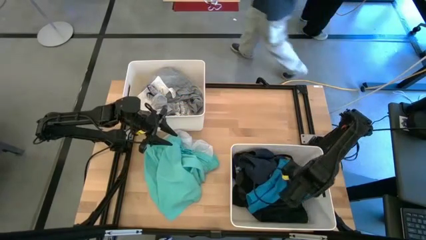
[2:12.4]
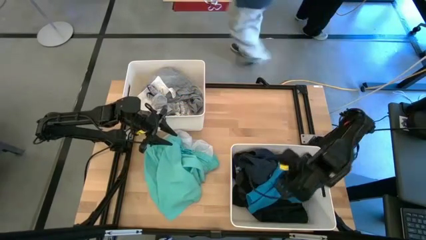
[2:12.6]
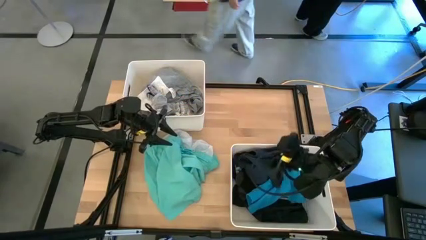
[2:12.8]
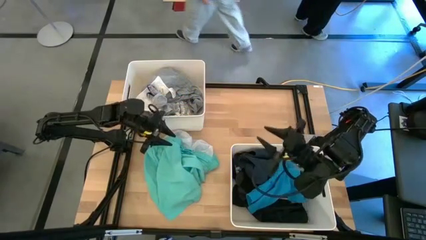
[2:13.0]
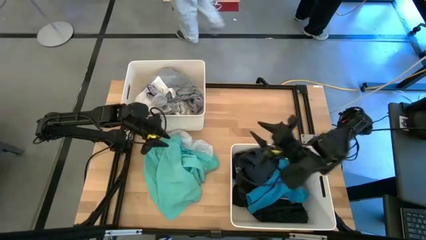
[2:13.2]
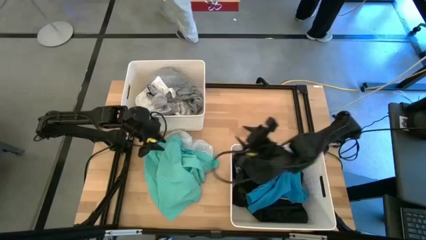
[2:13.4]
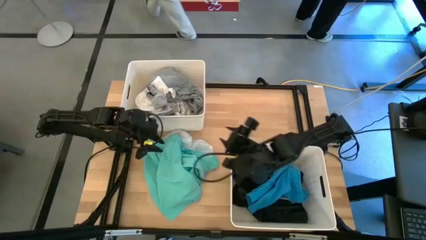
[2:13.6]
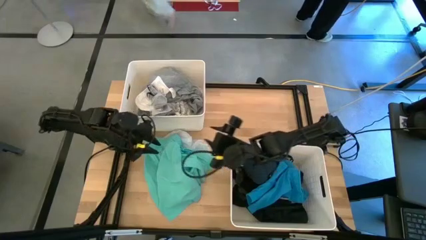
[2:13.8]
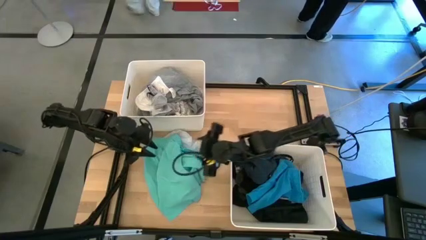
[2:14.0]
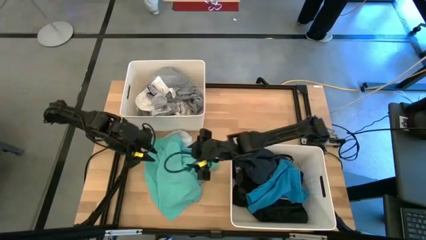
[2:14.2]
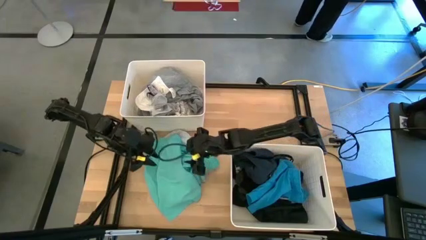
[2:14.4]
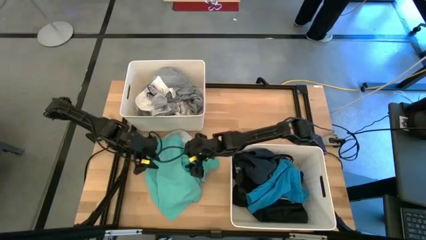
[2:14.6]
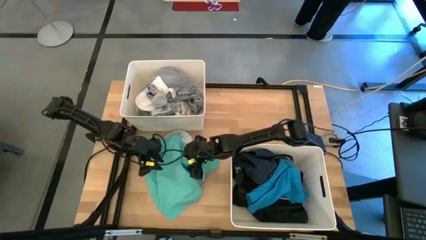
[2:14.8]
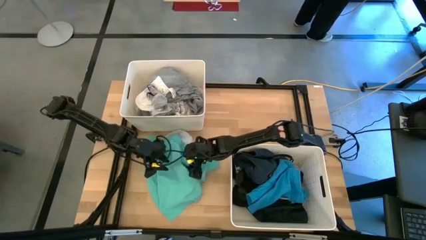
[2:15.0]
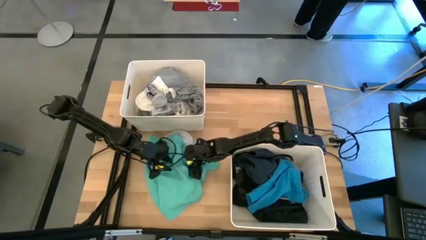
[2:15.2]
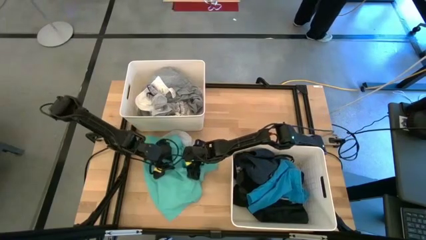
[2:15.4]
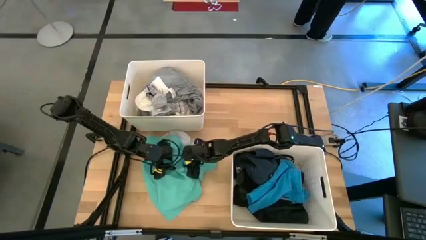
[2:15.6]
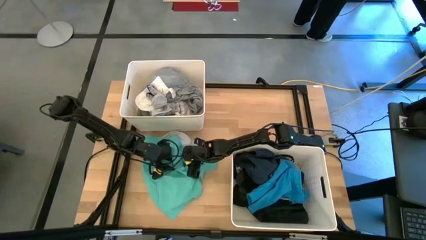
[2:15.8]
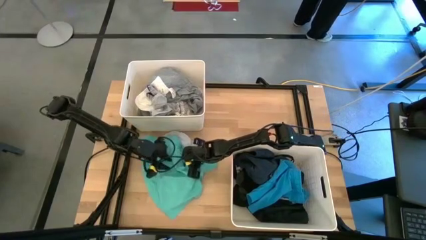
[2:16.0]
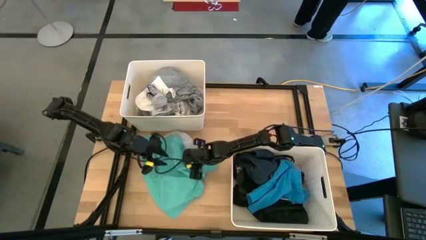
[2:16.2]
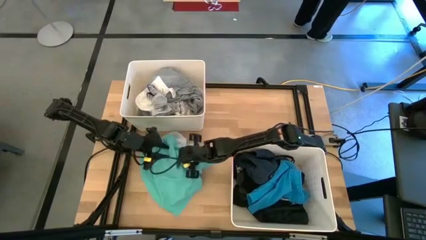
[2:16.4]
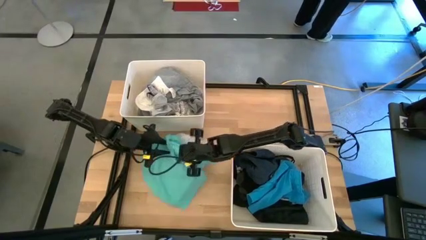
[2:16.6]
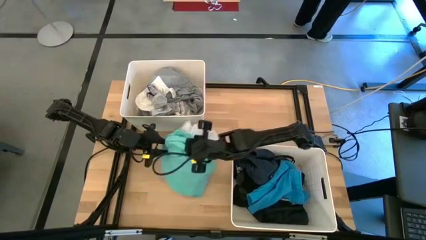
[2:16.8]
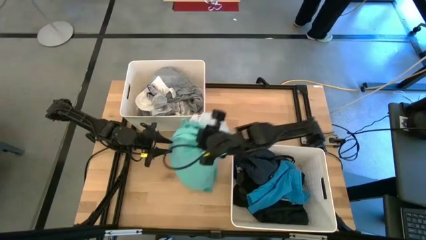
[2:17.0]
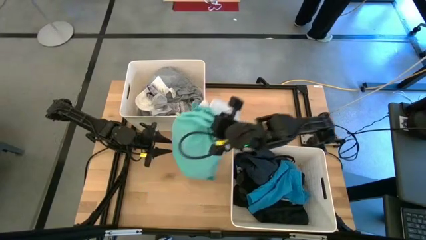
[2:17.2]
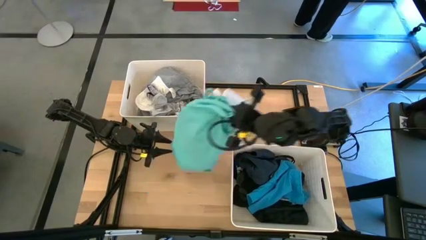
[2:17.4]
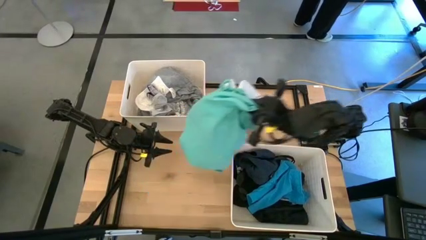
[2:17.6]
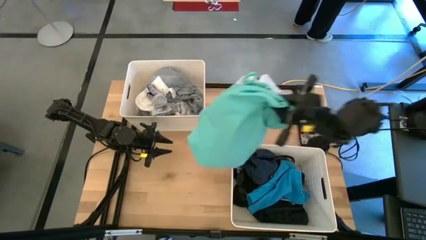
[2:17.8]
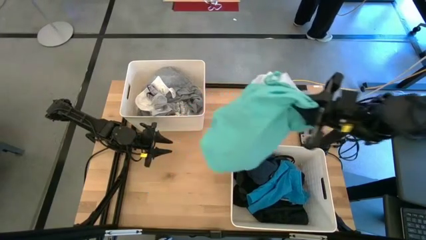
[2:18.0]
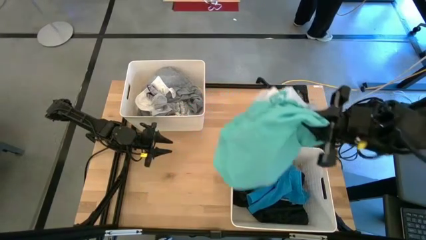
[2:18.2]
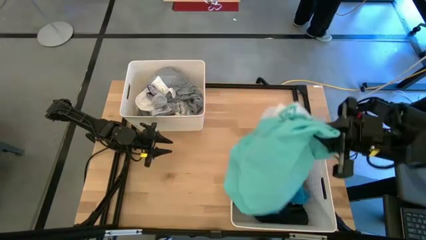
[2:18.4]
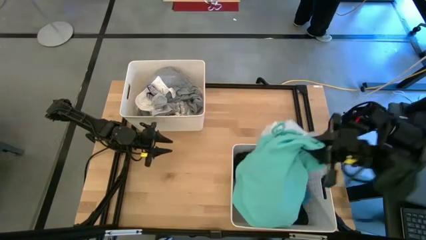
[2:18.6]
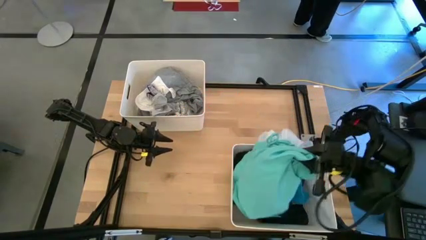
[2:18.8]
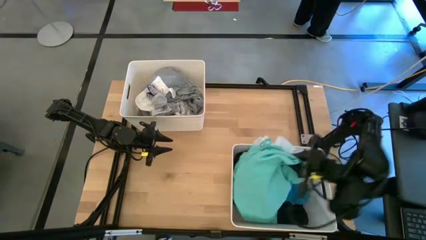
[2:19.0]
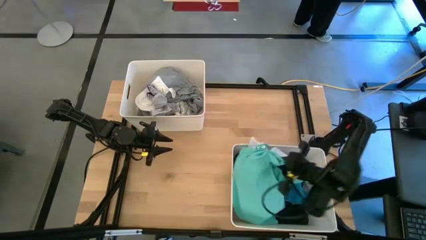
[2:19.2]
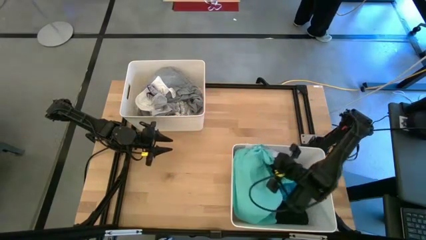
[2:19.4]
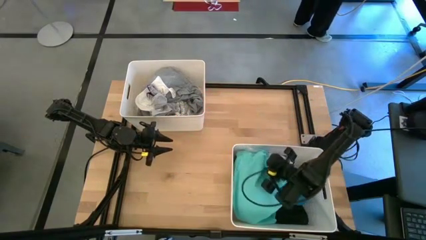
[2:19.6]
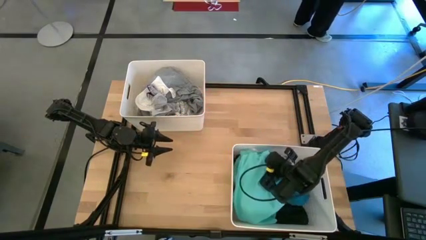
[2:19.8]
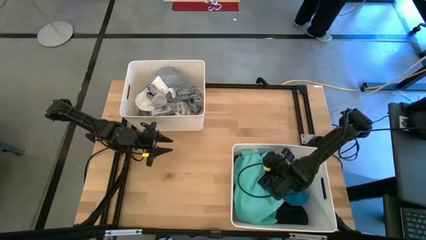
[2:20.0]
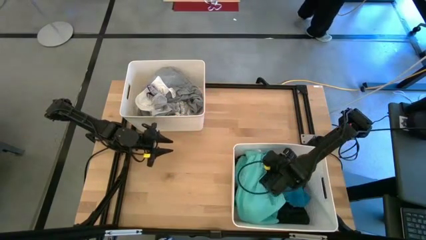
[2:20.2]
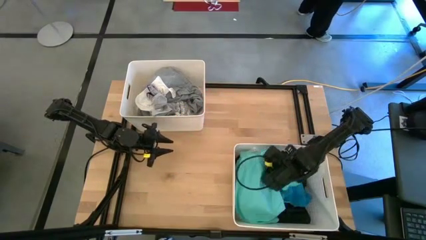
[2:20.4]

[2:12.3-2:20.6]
Task: Sort clothes
Put the light green short pants into the bottom right laundry bin

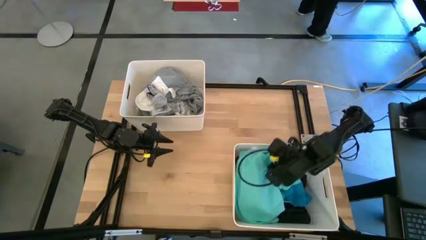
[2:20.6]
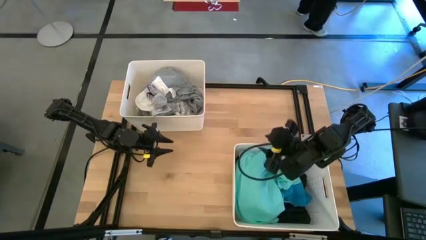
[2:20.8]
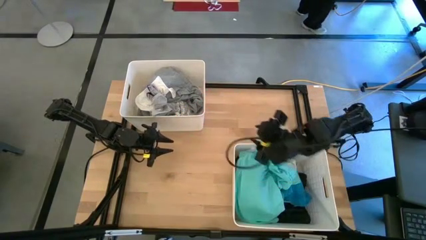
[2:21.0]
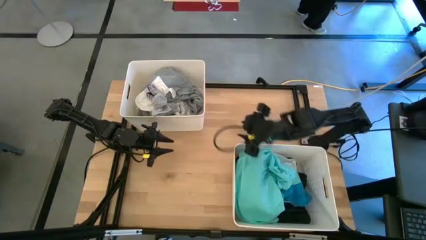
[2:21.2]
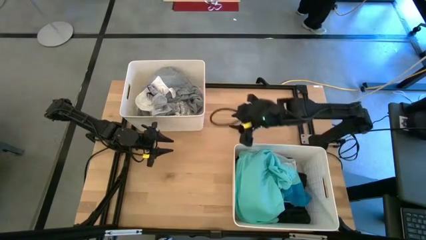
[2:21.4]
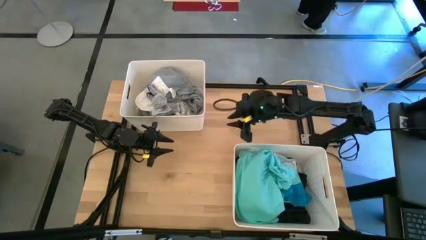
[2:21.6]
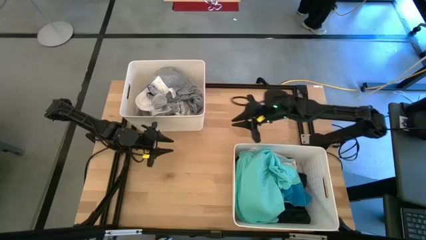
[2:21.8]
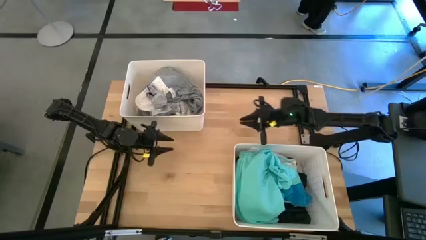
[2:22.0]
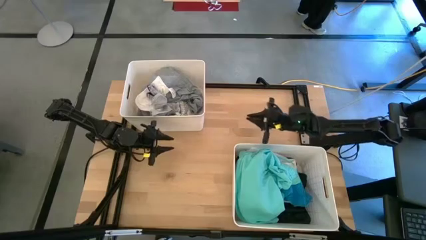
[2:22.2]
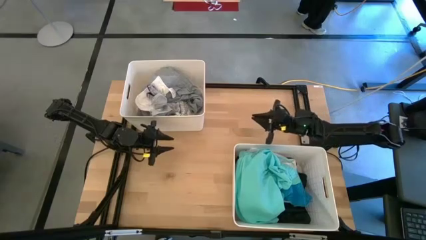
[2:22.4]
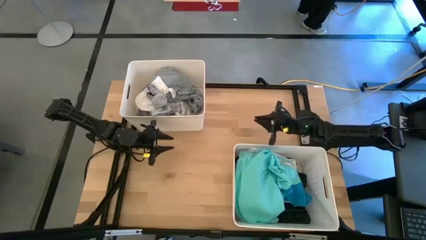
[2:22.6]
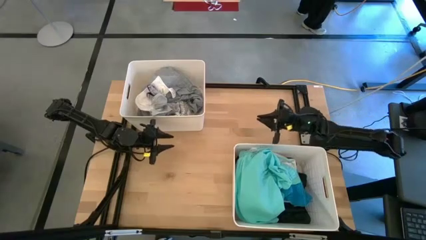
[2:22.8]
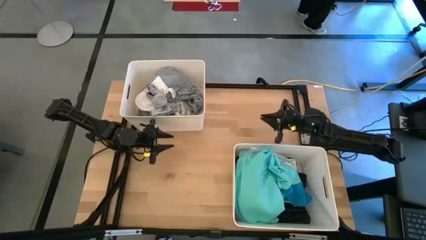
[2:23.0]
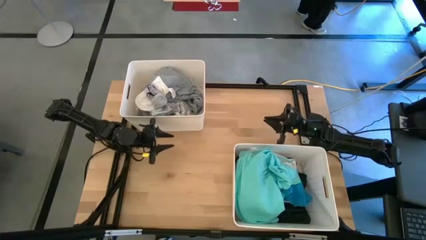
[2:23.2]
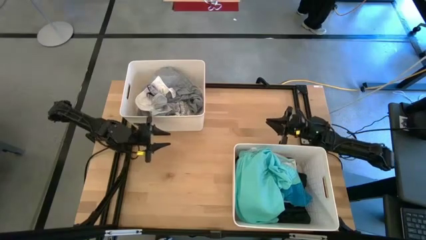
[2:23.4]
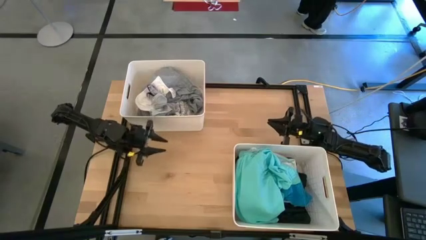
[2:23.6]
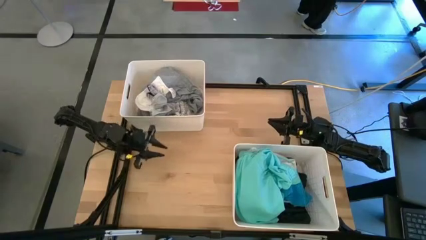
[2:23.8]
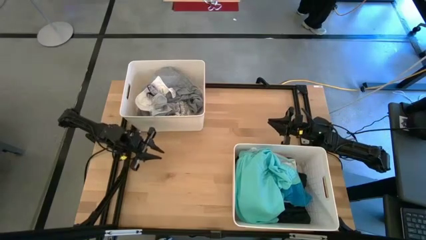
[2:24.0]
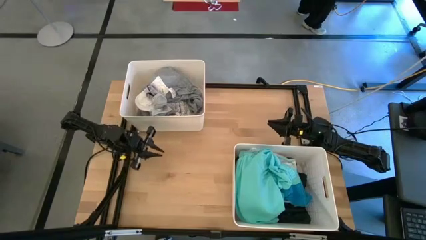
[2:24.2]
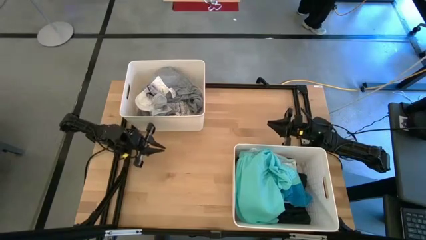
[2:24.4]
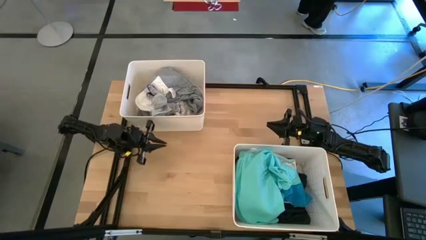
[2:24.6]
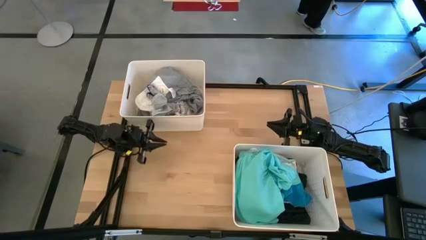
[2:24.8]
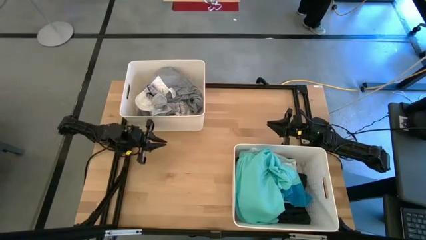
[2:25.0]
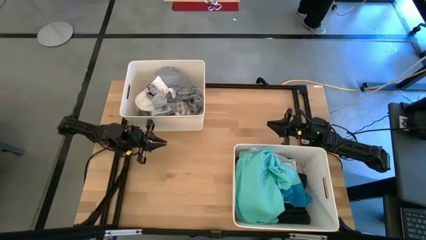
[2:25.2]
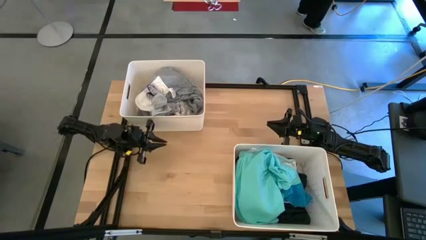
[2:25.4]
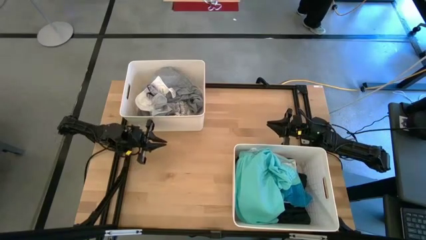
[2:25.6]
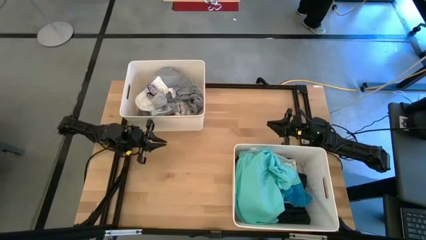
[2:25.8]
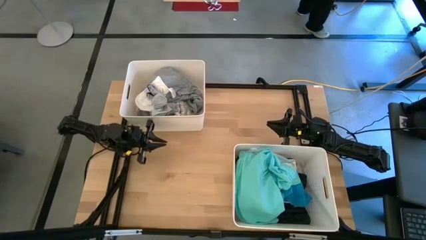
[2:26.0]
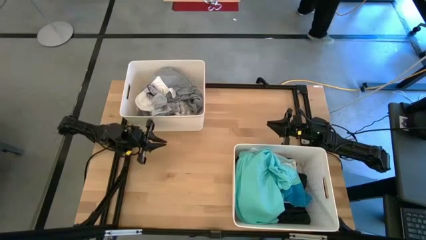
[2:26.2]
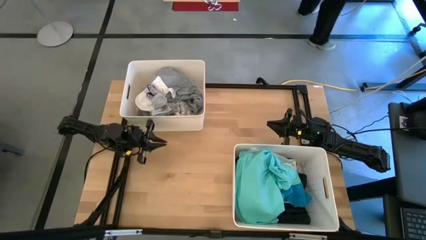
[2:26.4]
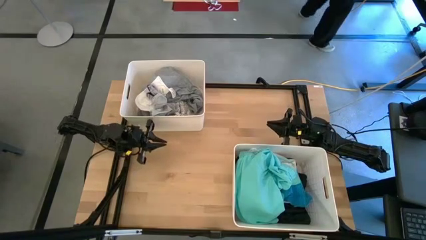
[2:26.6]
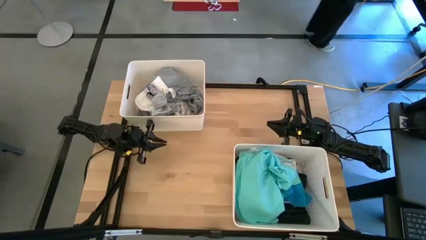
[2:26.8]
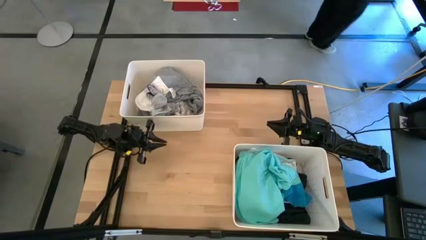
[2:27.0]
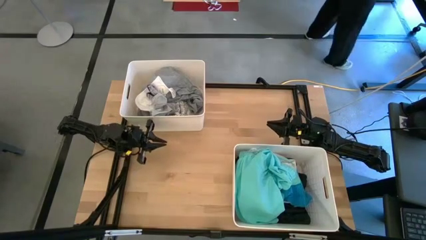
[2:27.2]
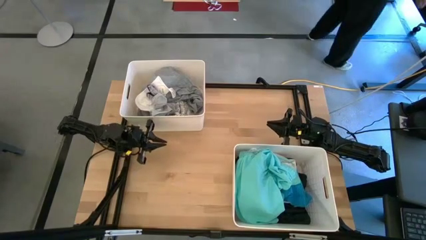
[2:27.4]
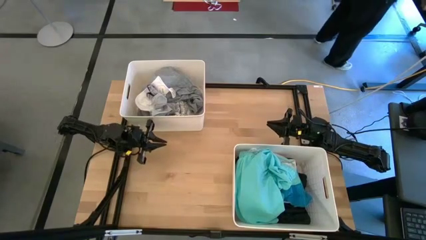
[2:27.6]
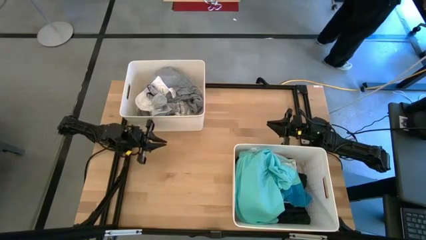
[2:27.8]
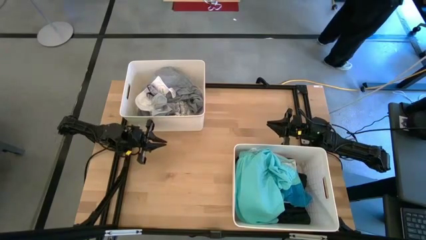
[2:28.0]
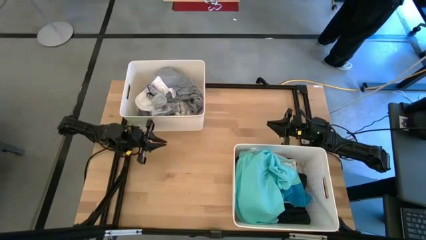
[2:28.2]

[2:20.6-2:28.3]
Return to Home Position
